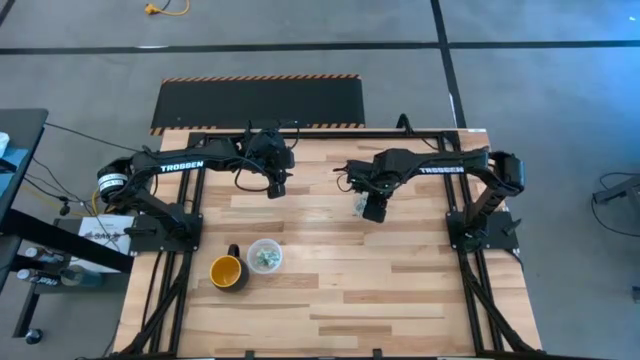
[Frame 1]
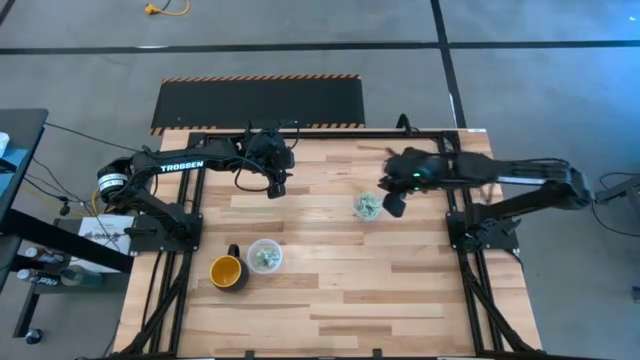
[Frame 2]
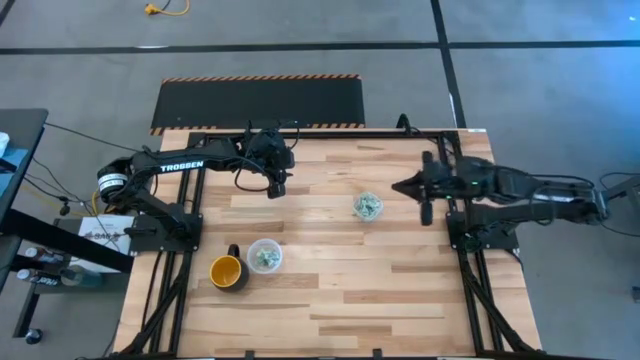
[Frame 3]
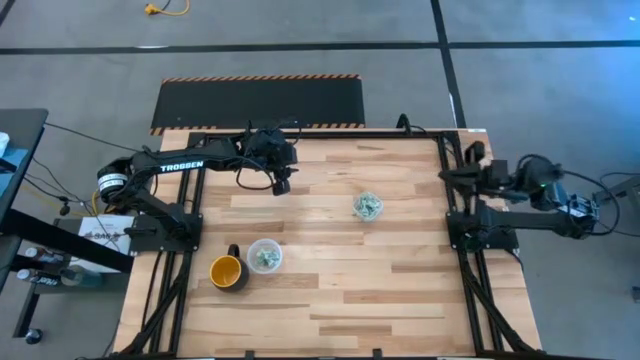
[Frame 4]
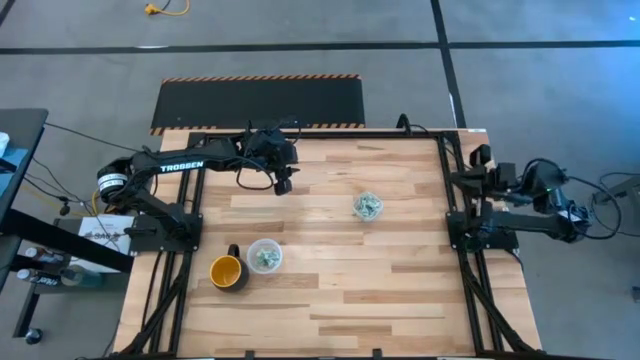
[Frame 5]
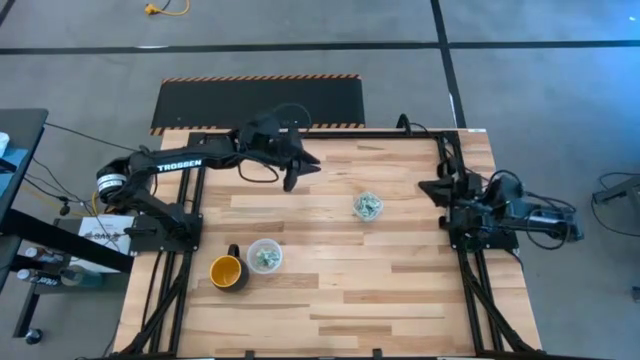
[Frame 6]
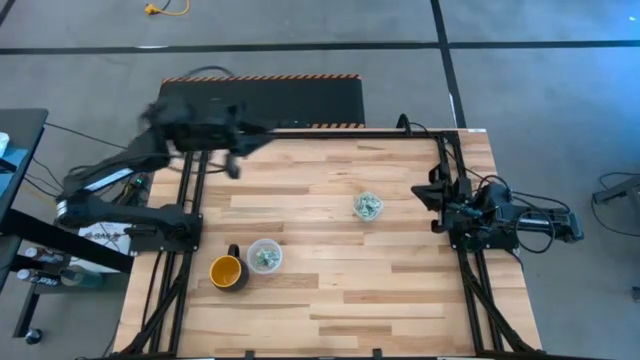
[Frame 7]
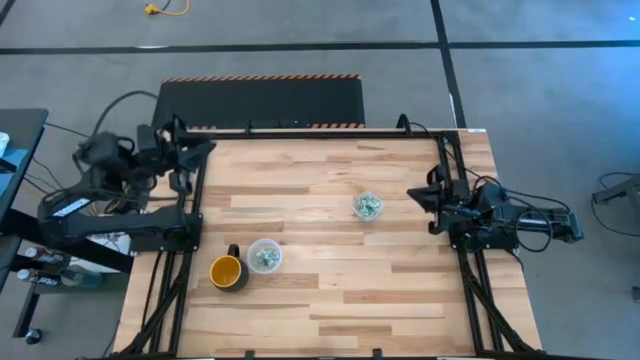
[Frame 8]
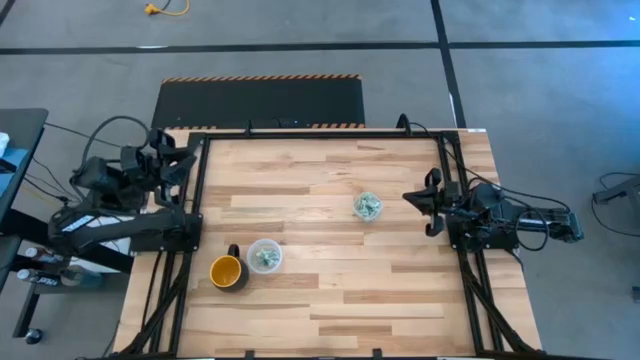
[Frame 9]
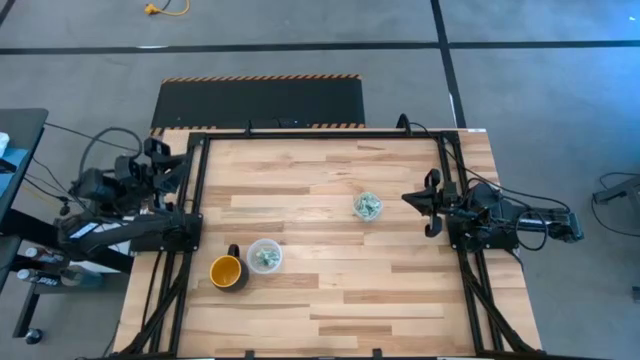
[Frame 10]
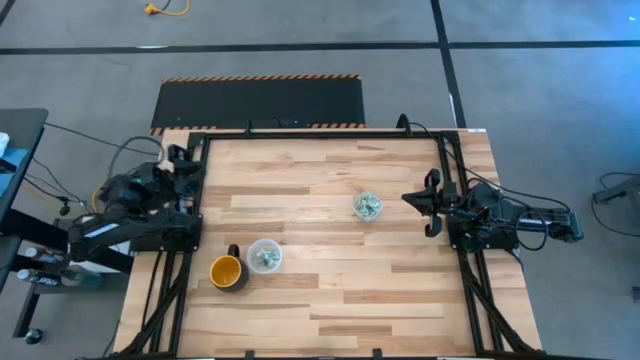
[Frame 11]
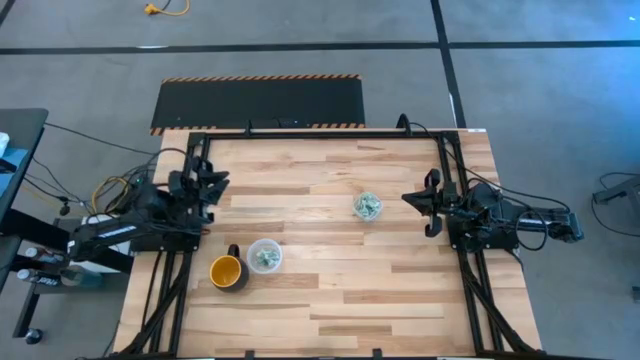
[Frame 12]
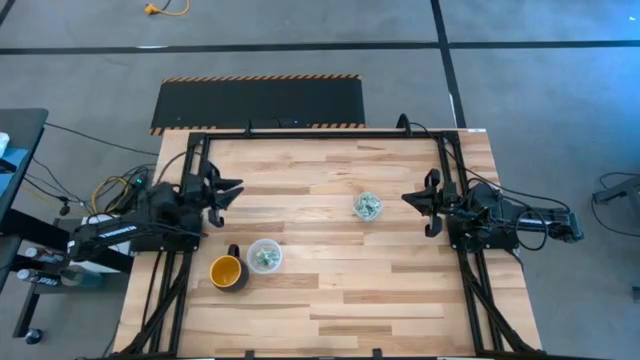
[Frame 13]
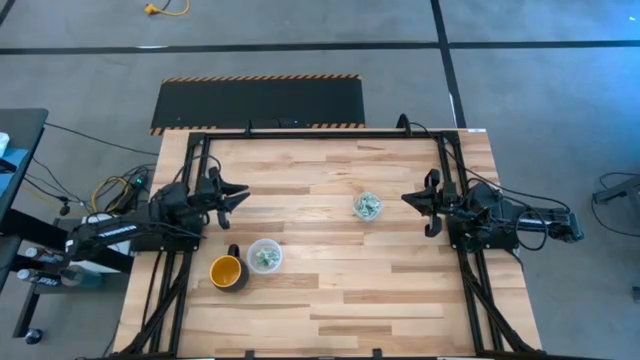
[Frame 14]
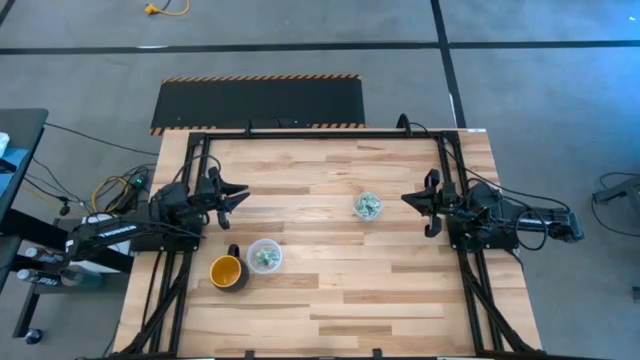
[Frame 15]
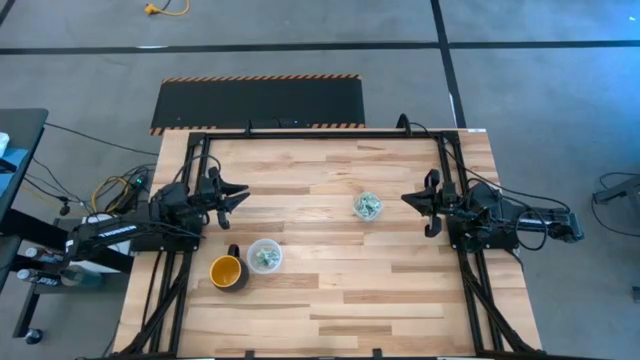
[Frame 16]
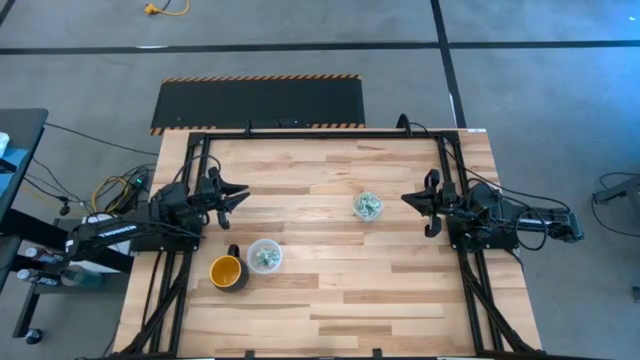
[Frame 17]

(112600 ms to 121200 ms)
Task: Pick and place Stevia / Truvia into bins
Return to Home Position

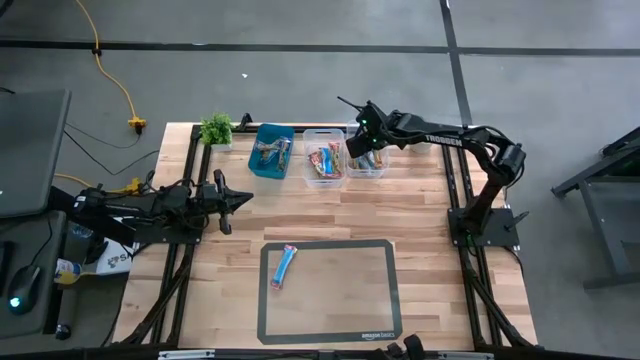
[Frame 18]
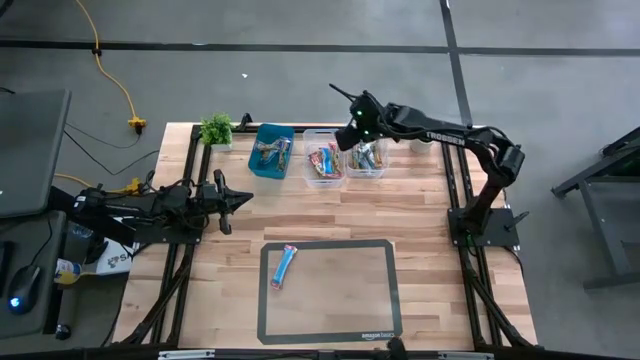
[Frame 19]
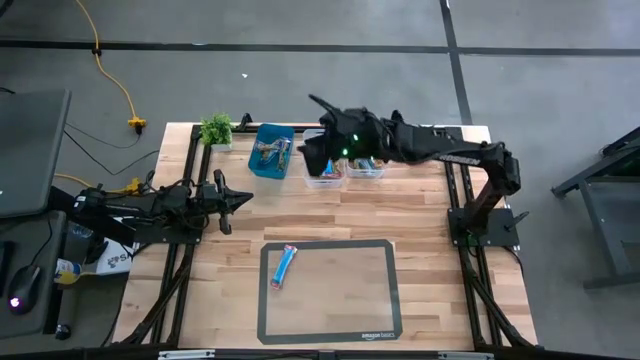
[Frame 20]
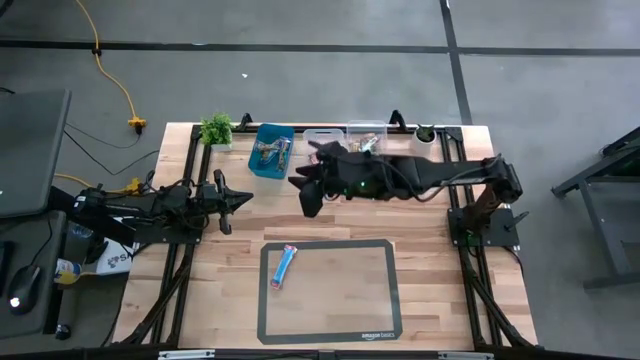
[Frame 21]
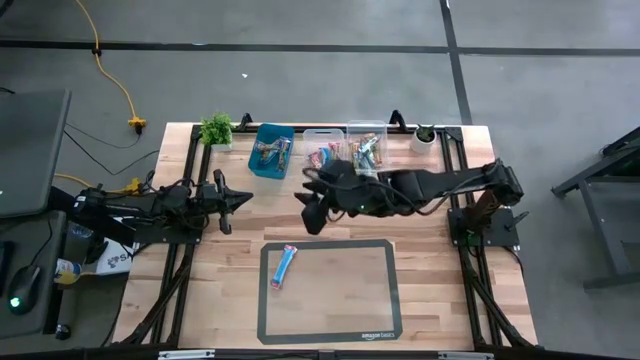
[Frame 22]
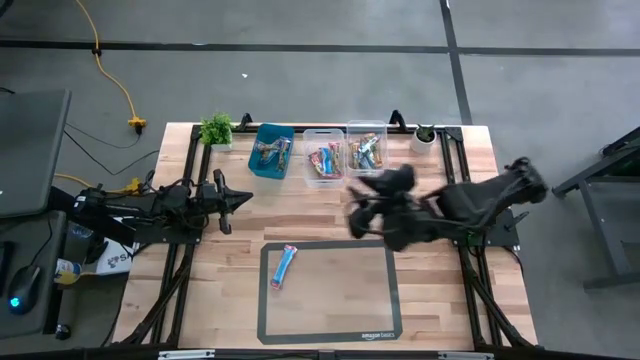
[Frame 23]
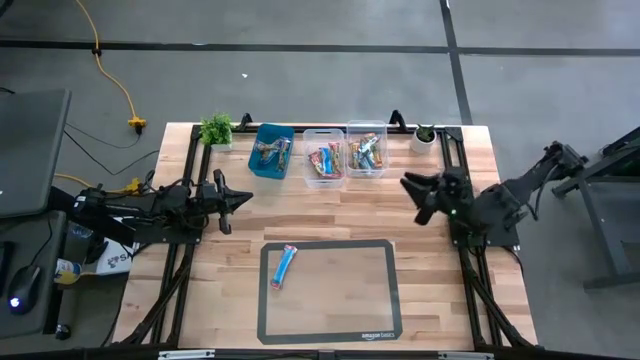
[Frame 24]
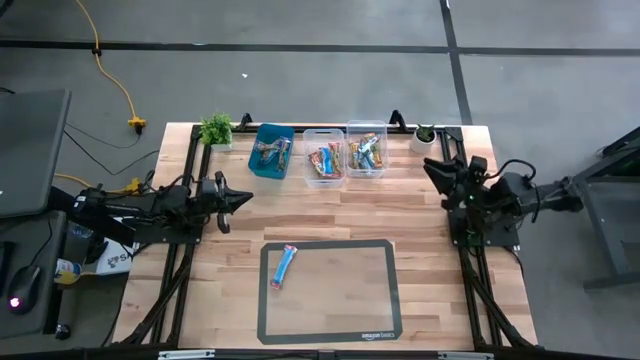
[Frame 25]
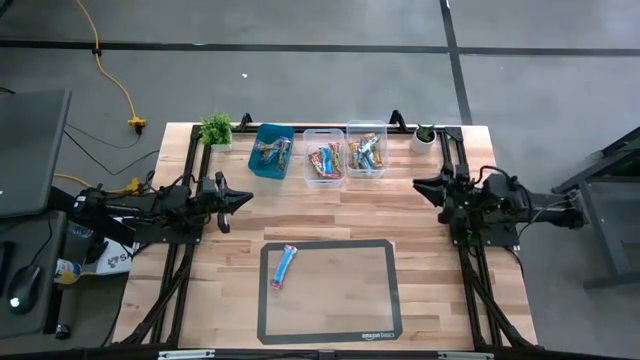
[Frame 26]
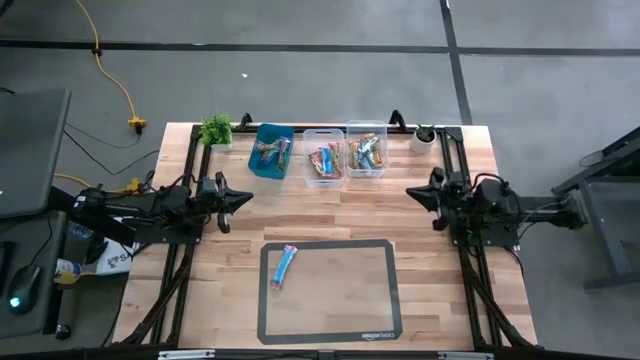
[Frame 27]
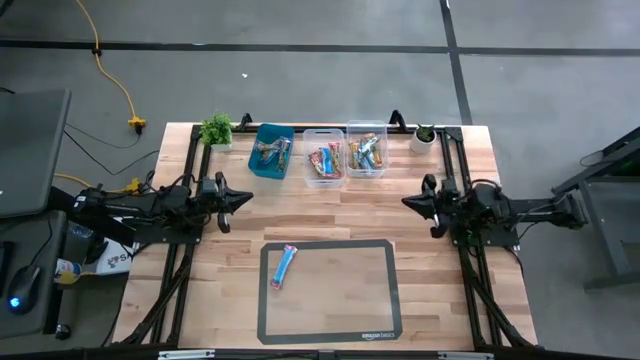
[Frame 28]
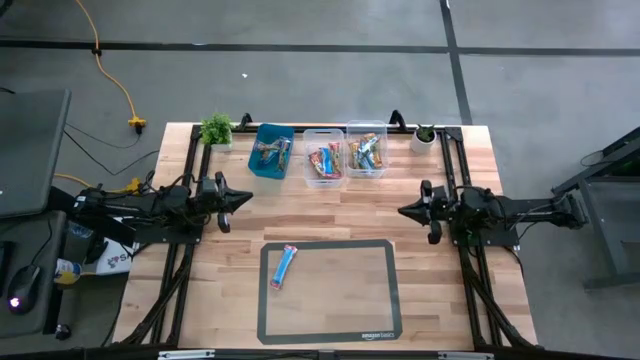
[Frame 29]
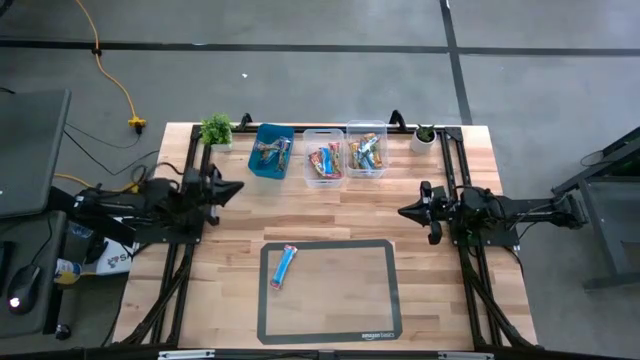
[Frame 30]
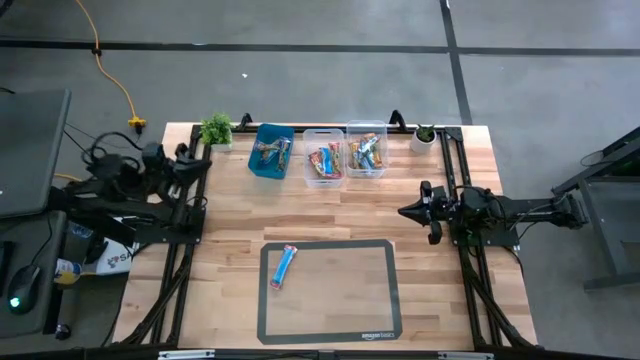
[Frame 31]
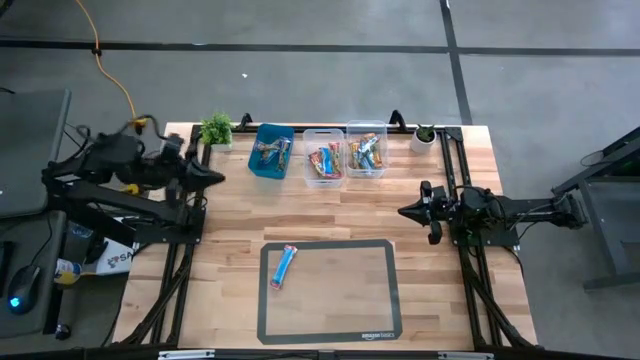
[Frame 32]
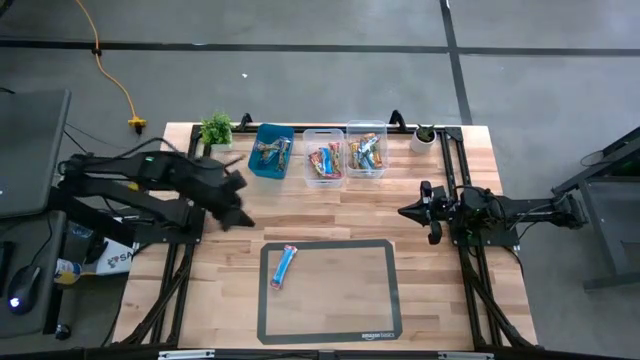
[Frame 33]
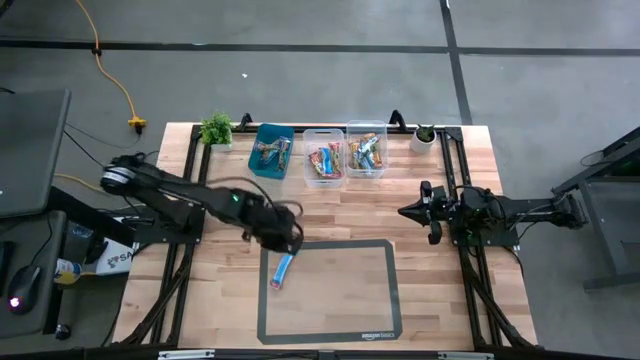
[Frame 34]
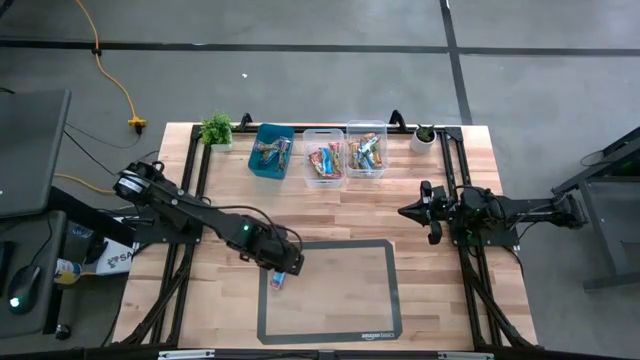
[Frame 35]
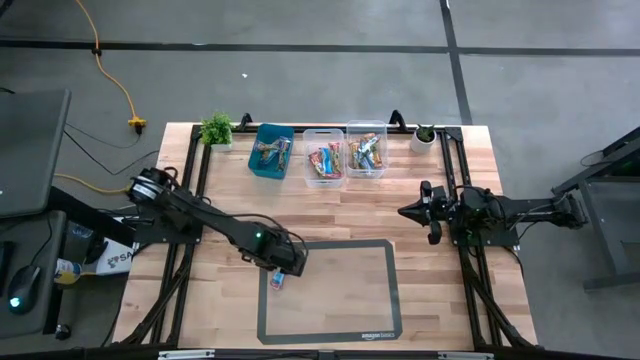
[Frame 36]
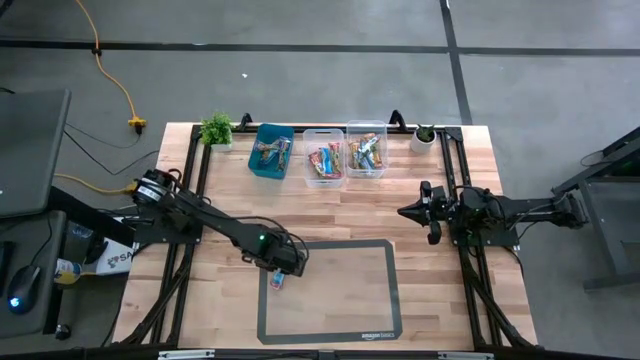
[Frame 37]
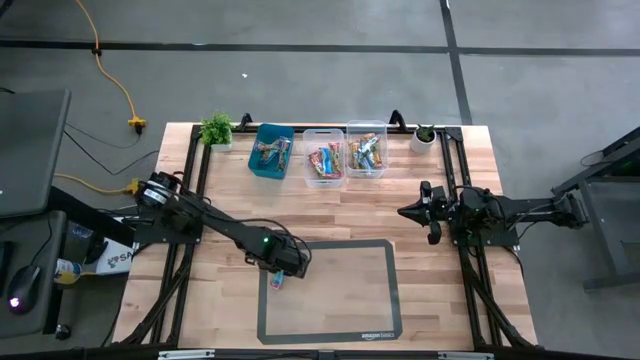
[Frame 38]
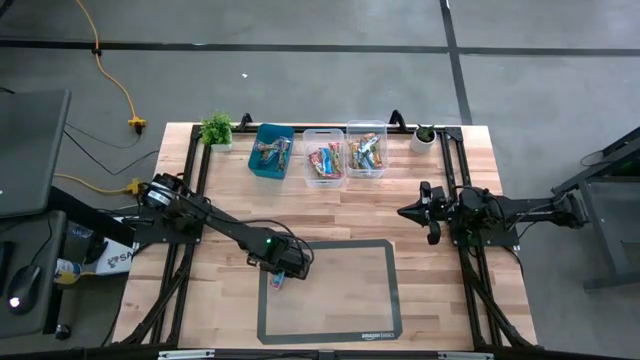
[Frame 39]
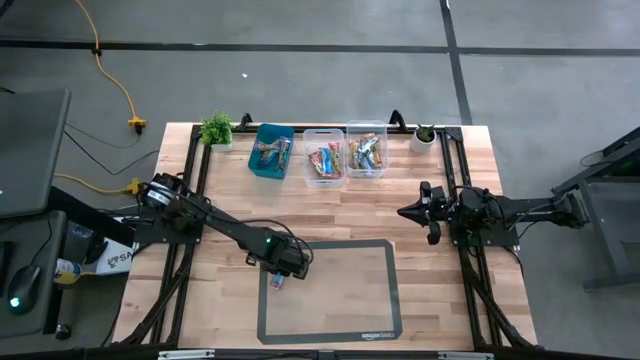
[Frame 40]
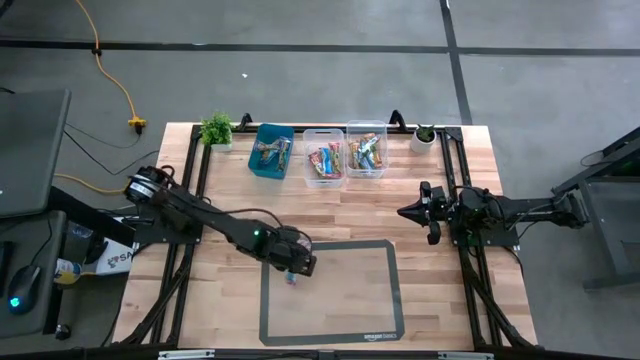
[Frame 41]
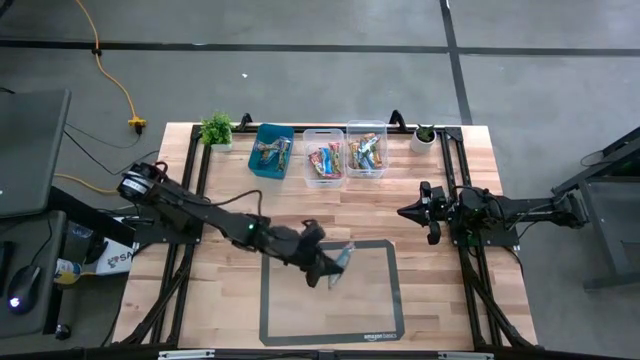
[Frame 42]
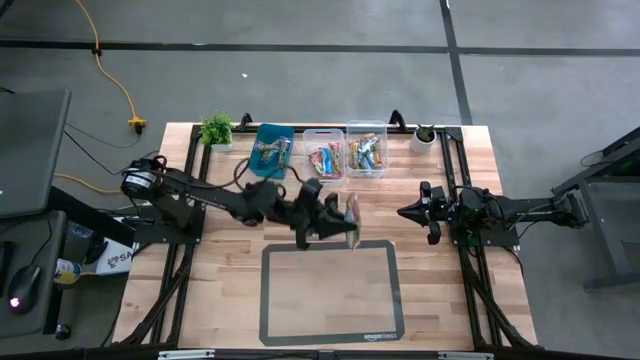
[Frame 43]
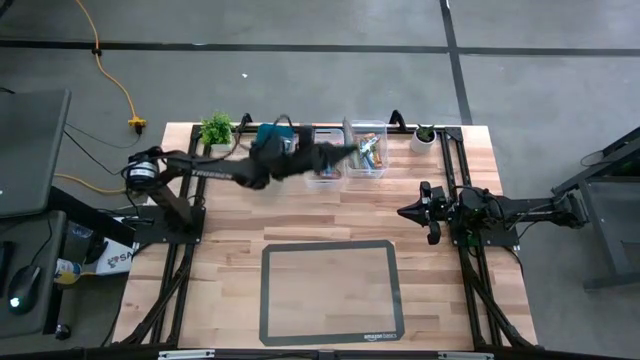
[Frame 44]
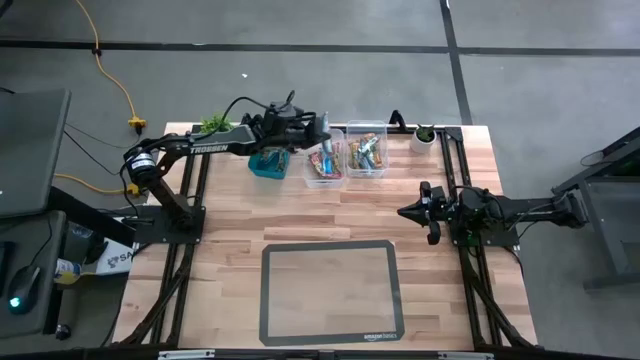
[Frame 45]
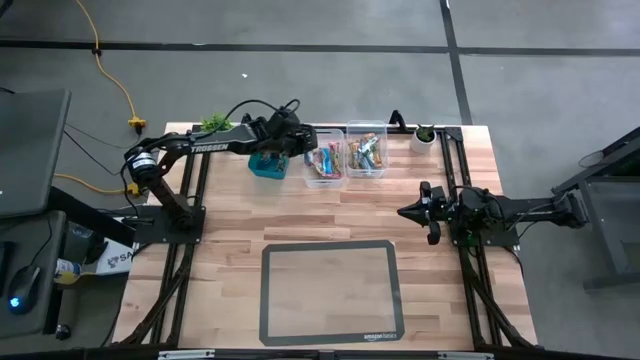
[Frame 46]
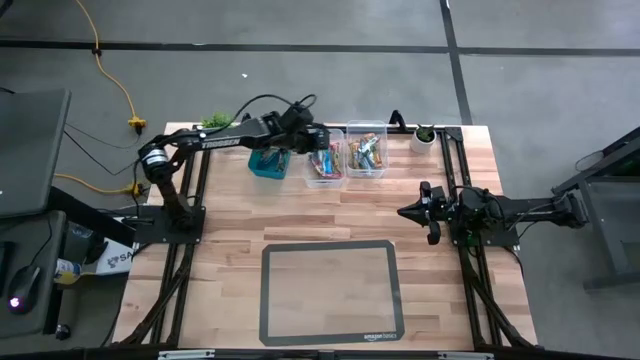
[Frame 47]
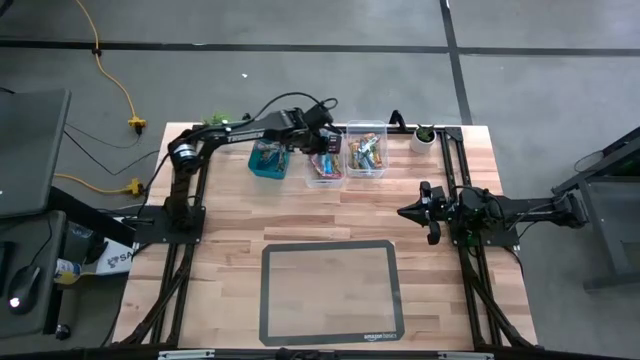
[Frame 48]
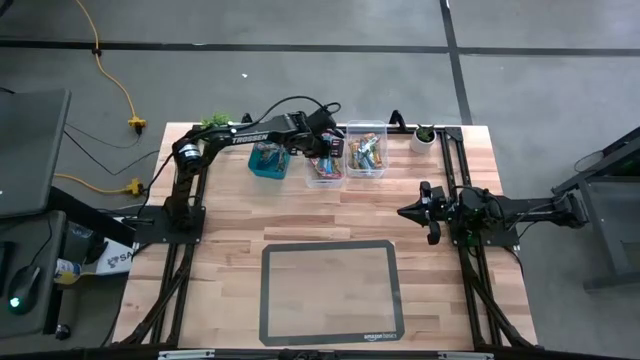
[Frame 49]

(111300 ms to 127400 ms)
Task: Pick and place Granola Bars by type
Put the red granola bar into the left transparent bin
